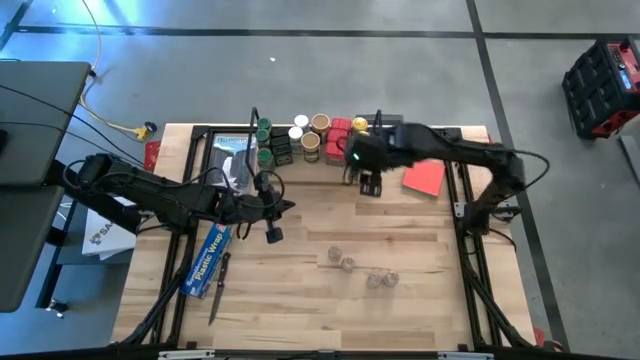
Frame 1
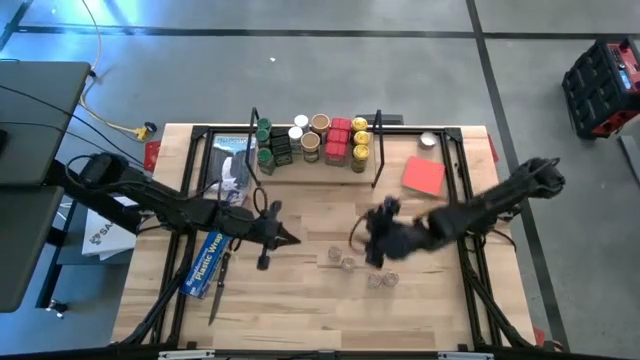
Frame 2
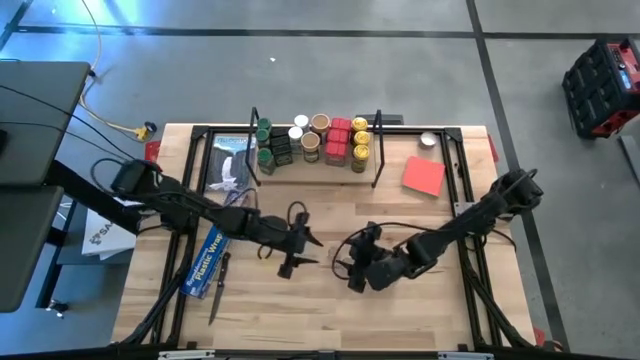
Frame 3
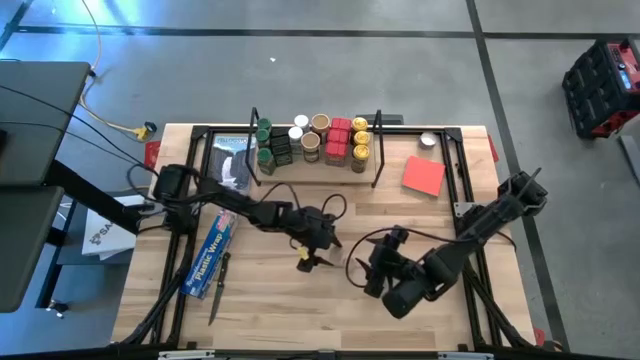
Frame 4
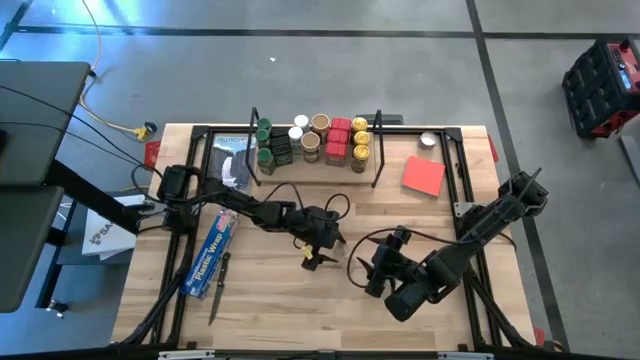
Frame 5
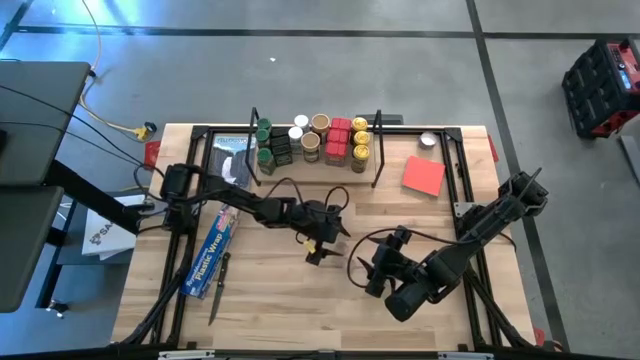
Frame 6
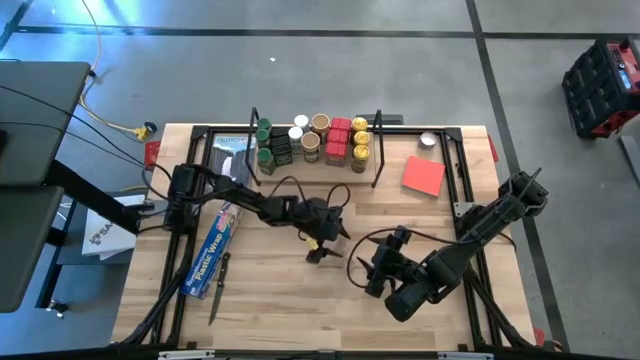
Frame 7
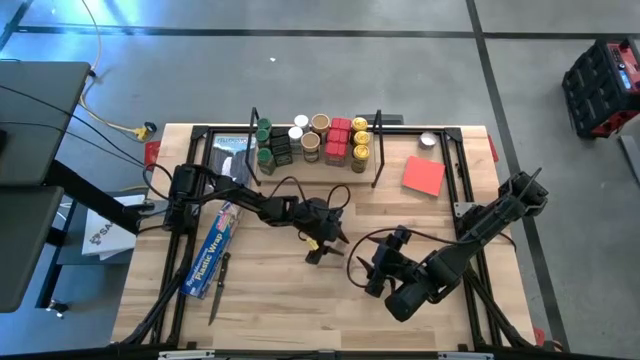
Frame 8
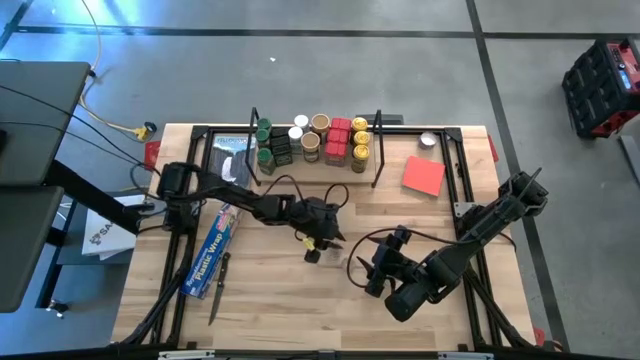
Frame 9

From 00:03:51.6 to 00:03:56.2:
Task: Shelf spices
Put the brown seasoning bottle on the shelf to the bottom of the white seasoning bottles

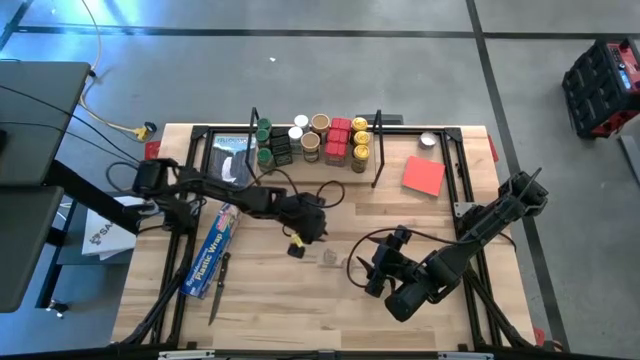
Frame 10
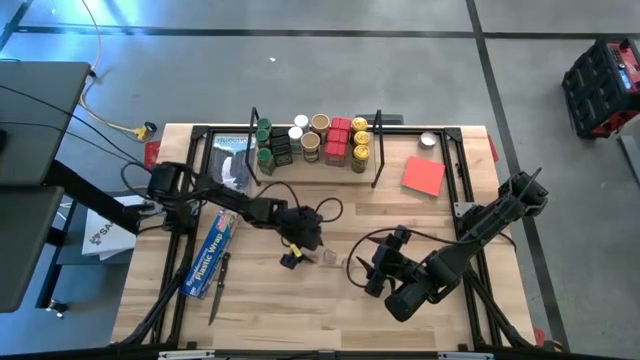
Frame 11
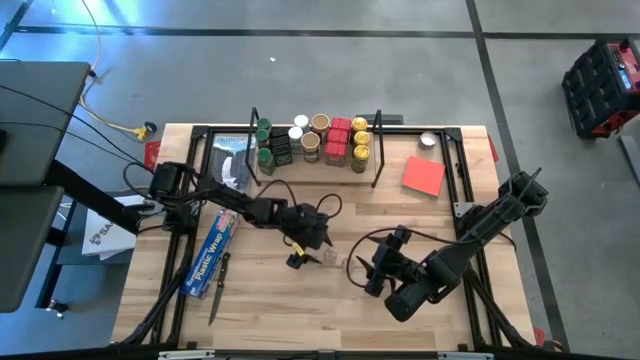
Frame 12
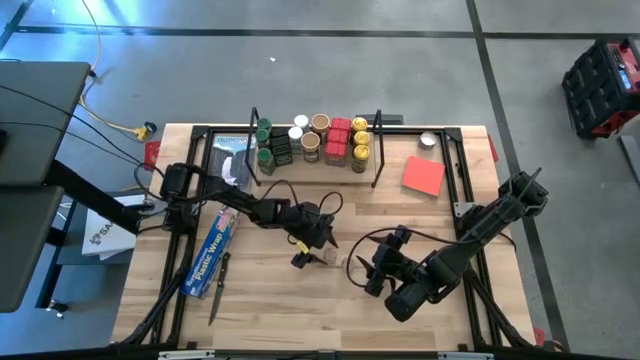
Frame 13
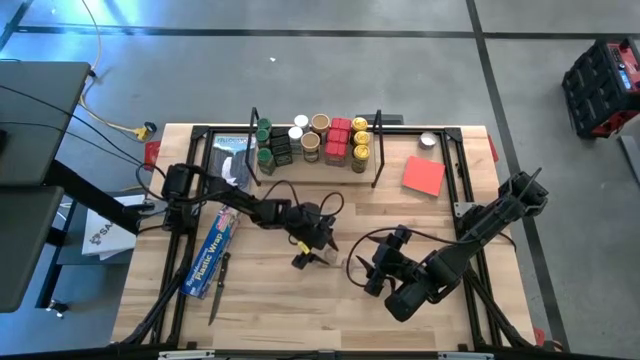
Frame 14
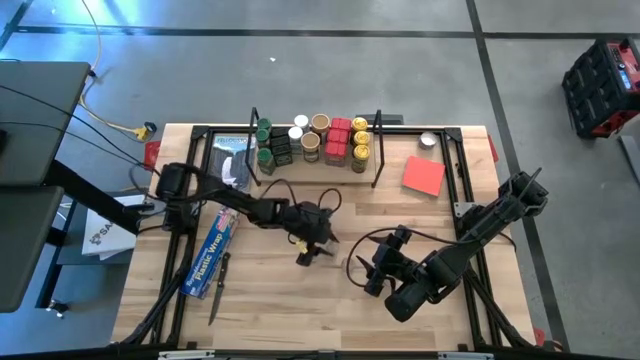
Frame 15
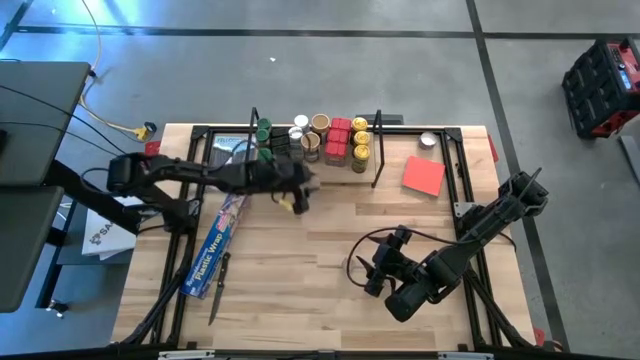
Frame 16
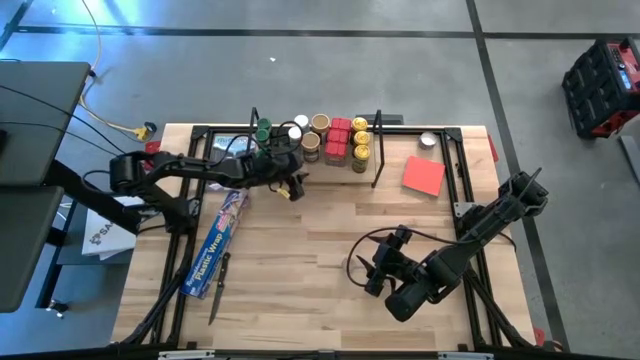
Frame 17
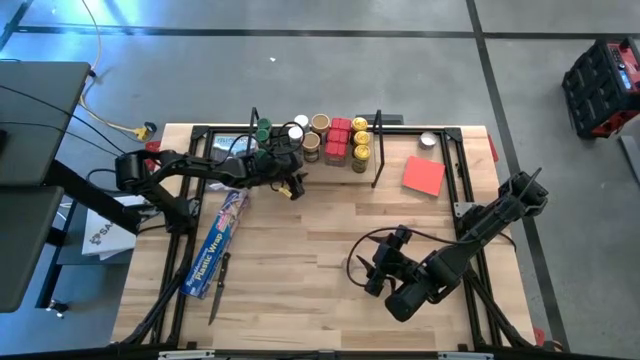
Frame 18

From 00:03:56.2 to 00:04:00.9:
Put the brown seasoning bottle on the shelf to the bottom of the white seasoning bottles

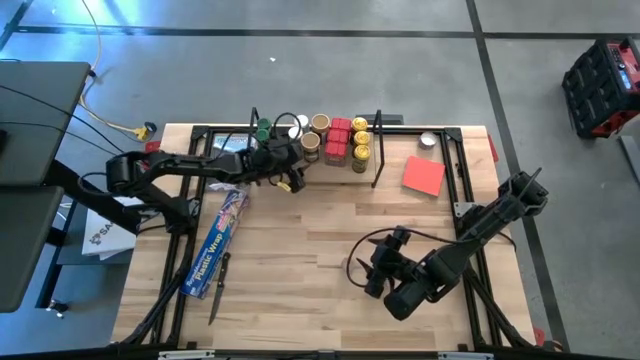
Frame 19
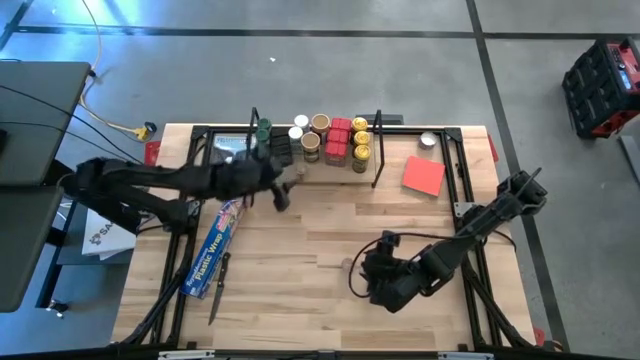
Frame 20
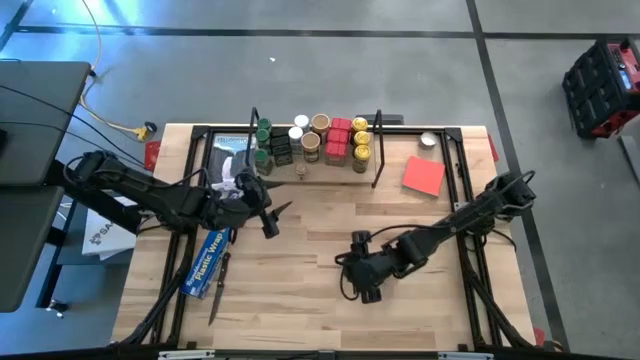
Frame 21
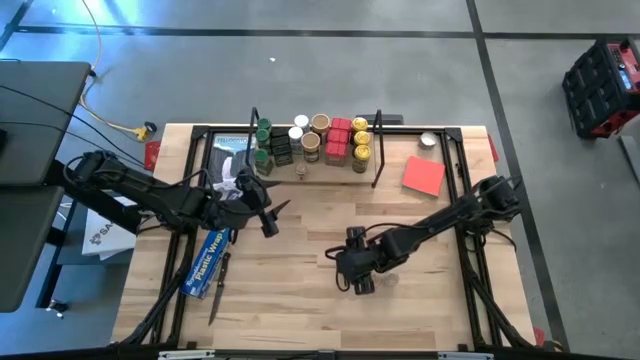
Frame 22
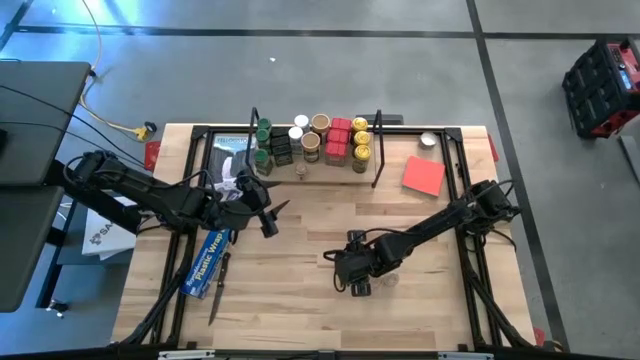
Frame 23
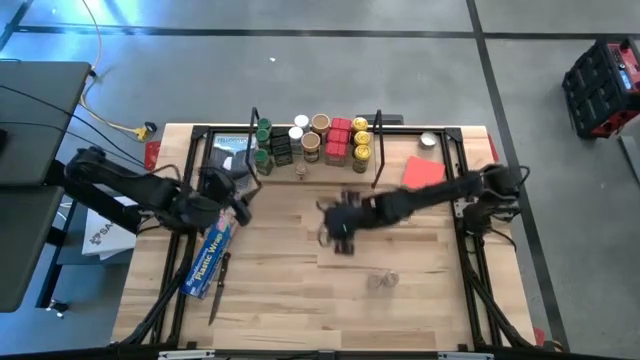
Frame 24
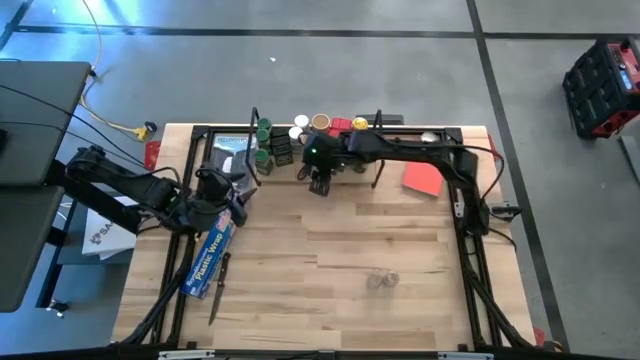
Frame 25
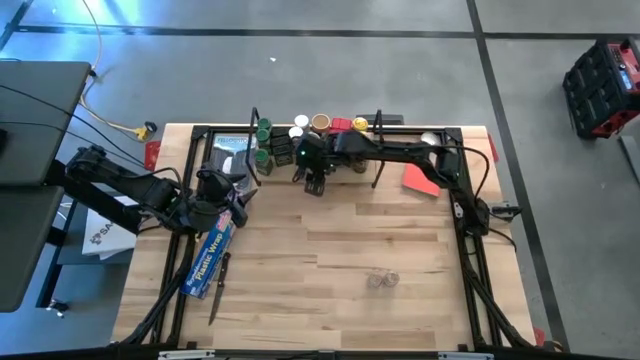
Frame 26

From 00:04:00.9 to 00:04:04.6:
Put the brown seasoning bottle on the shelf and align it with the other brown seasoning bottle

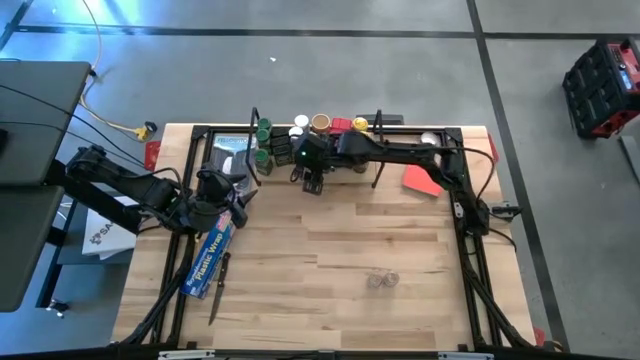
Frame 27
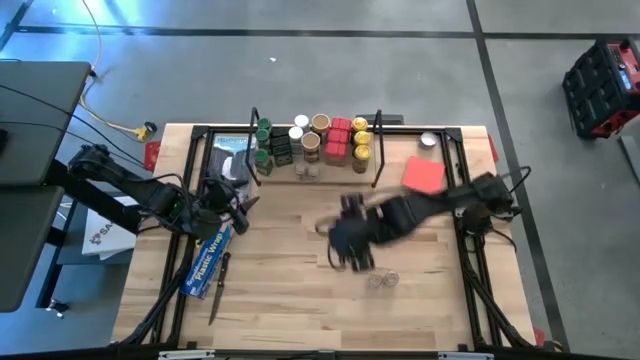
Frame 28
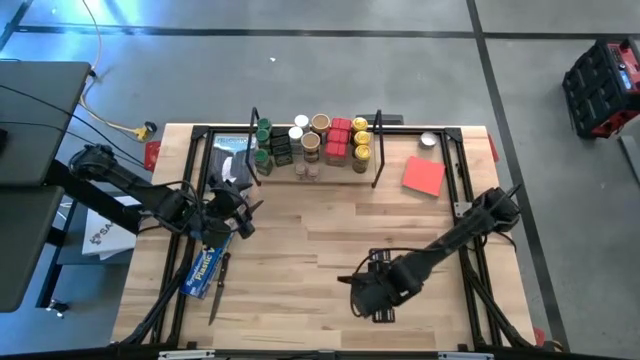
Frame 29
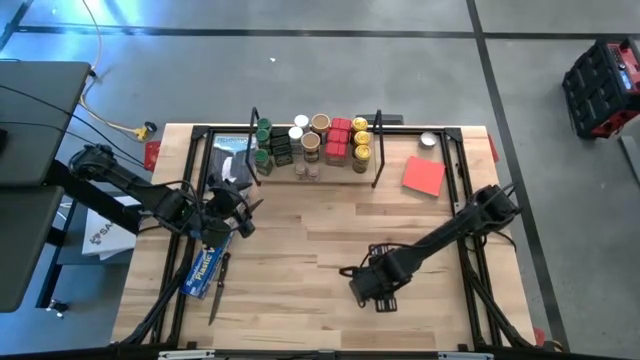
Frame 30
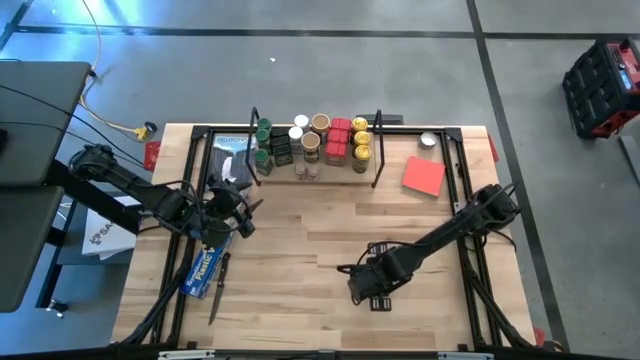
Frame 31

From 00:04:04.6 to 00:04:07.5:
Put the brown seasoning bottle on the shelf and align it with the other brown seasoning bottles

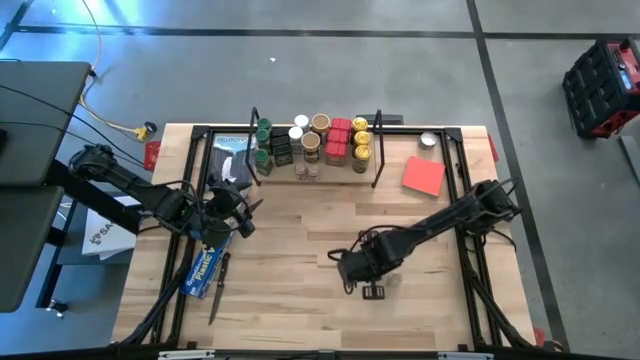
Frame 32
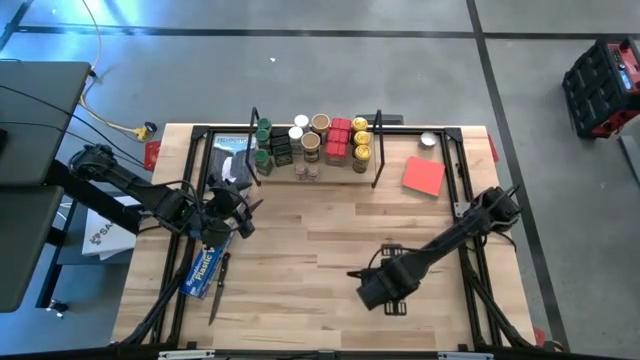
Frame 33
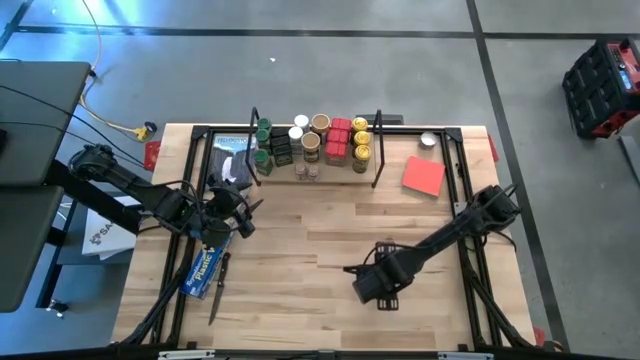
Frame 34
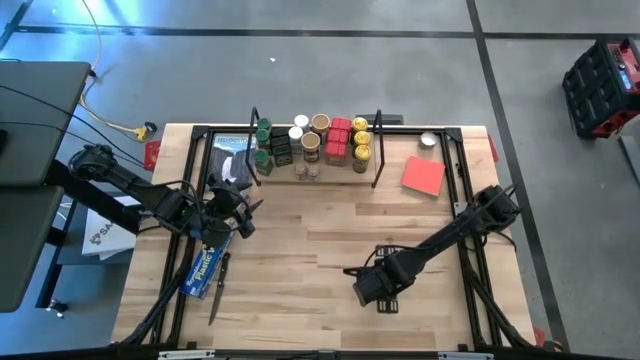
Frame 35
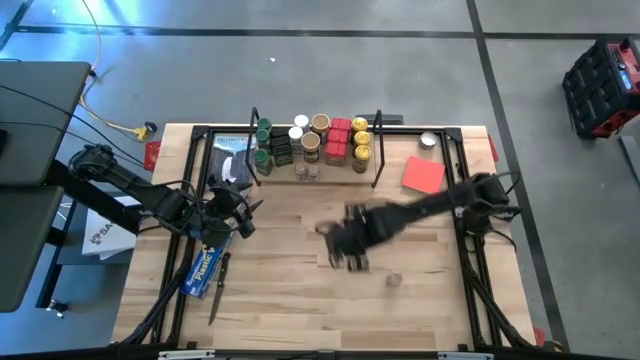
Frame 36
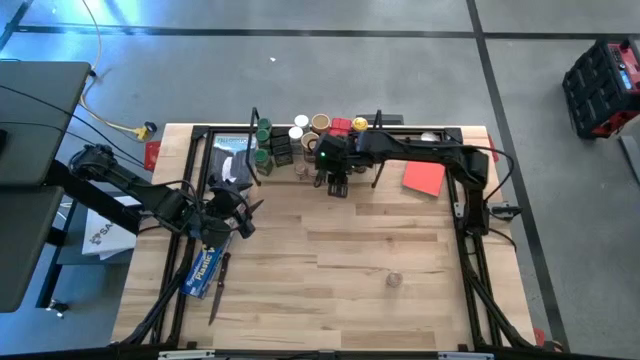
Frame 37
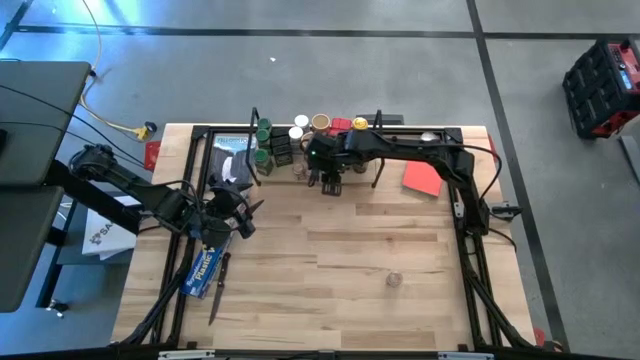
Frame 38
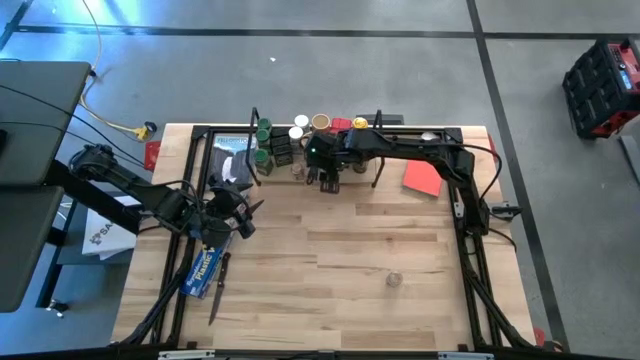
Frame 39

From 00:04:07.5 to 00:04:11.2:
Put the brown seasoning bottle on the shelf and align it with the other brown seasoning bottles

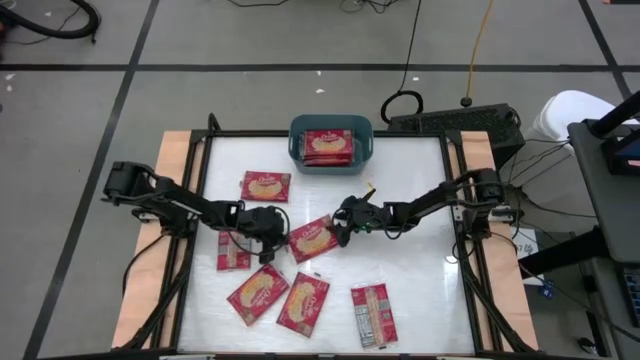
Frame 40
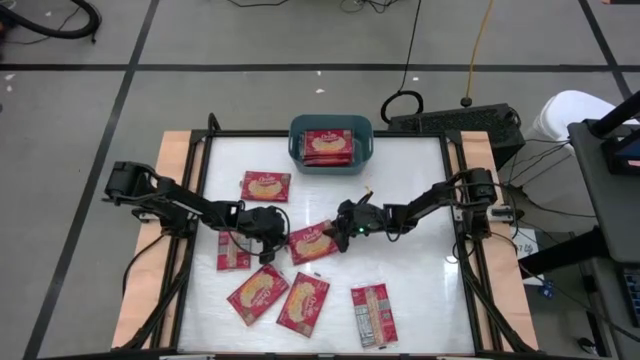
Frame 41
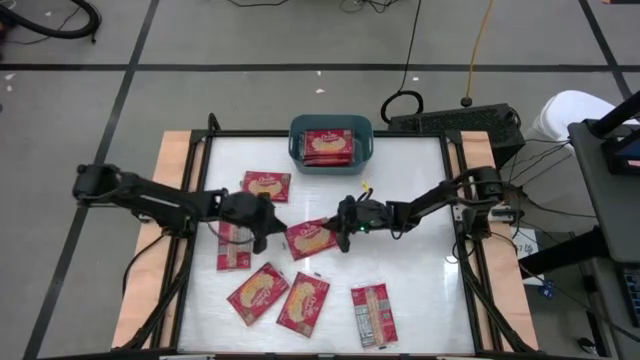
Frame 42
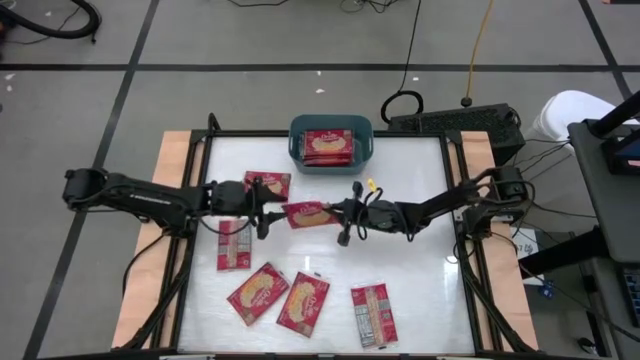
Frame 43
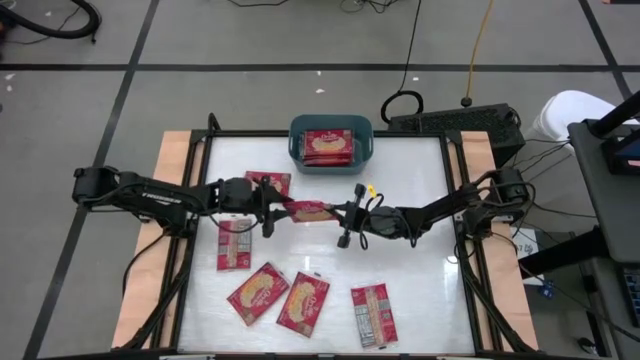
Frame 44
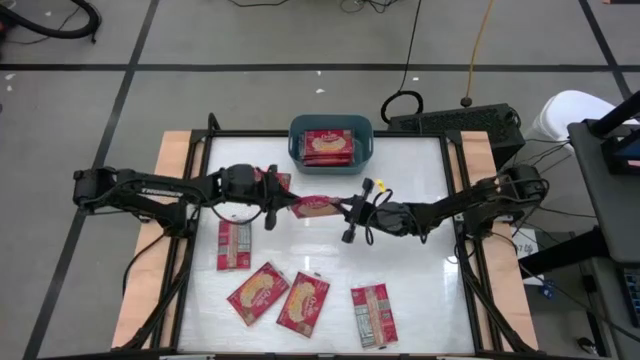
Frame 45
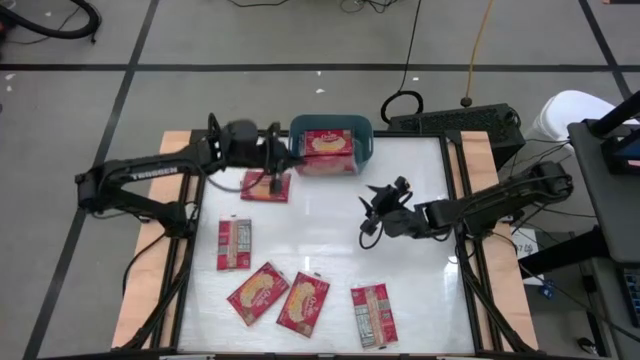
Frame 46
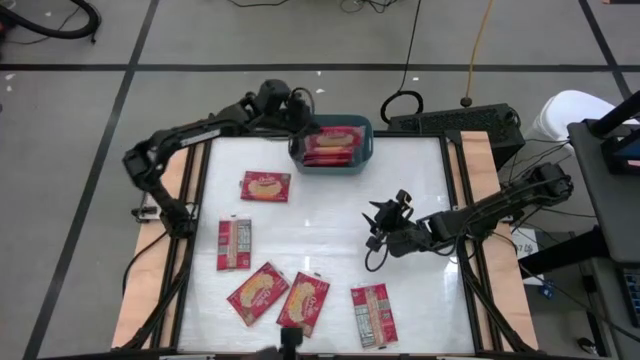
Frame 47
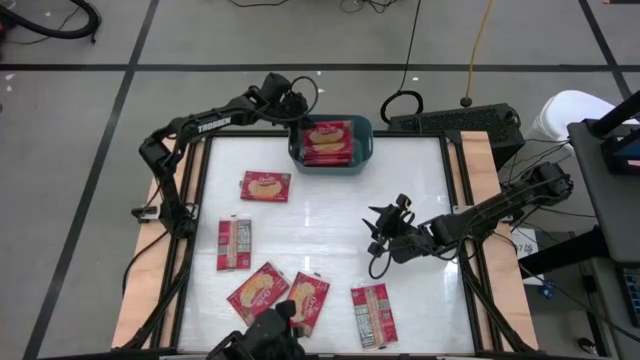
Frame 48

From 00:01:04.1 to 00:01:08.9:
Task: Sort popcorn bags into baskets
Put the red popcorn bag into the green bin
